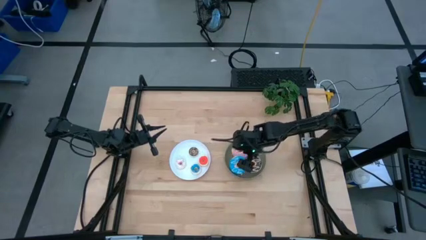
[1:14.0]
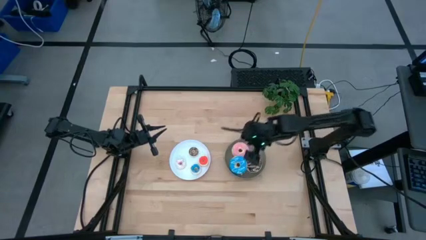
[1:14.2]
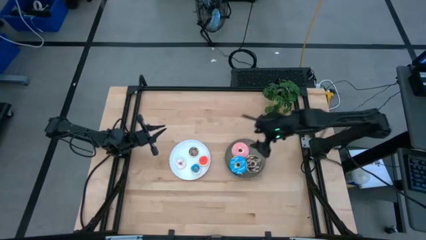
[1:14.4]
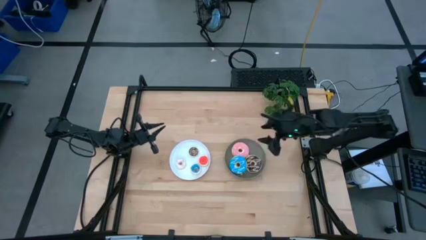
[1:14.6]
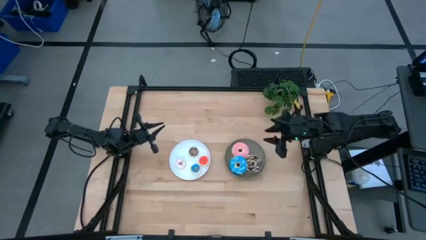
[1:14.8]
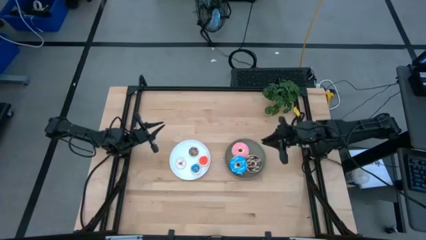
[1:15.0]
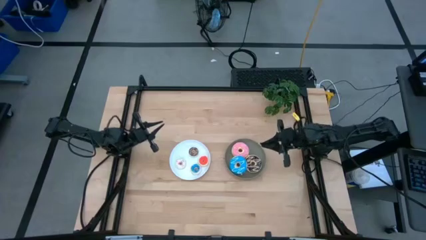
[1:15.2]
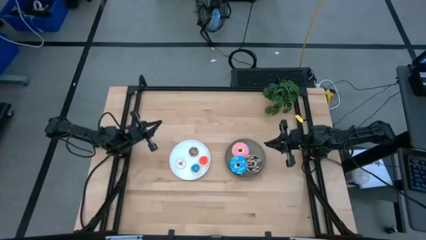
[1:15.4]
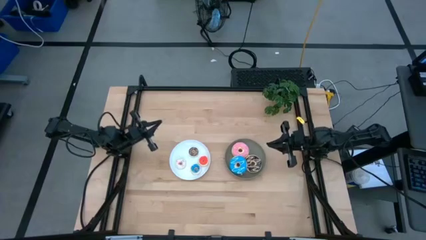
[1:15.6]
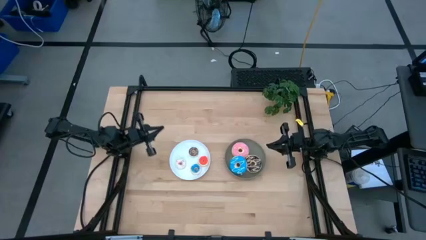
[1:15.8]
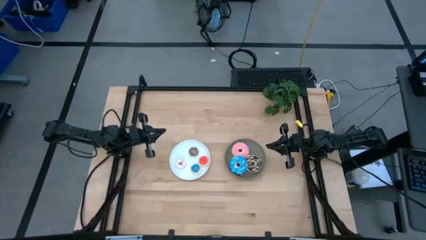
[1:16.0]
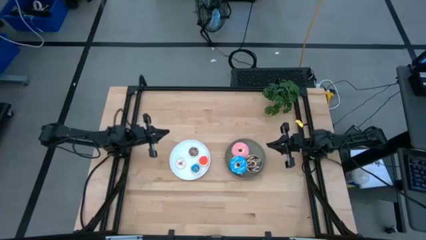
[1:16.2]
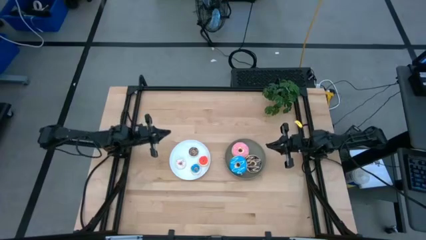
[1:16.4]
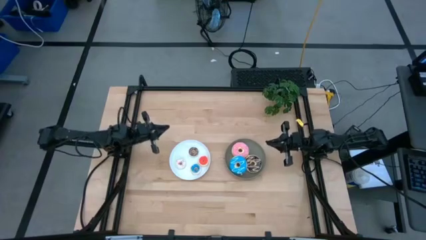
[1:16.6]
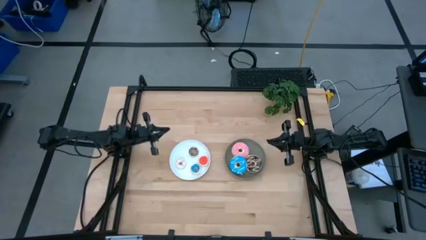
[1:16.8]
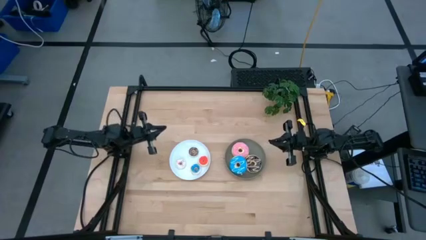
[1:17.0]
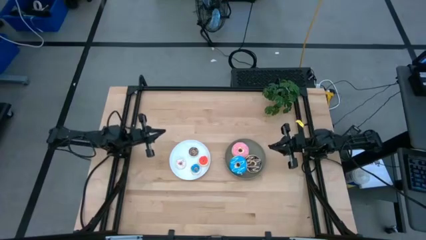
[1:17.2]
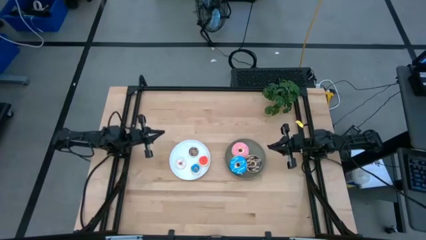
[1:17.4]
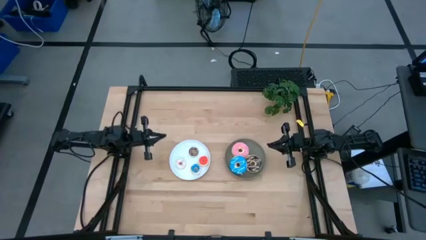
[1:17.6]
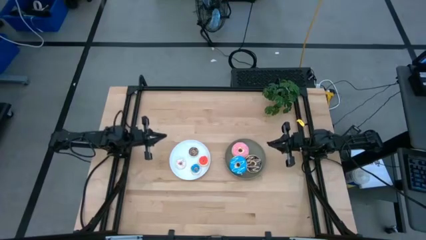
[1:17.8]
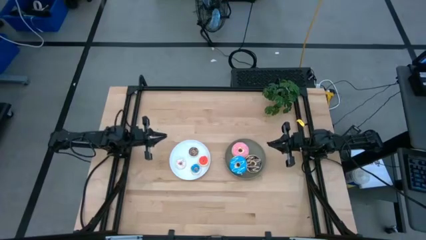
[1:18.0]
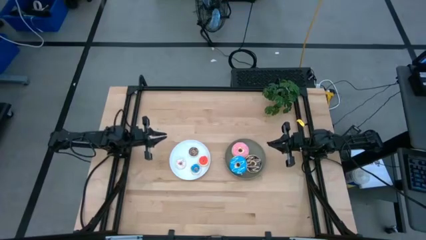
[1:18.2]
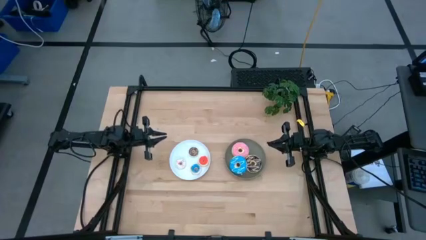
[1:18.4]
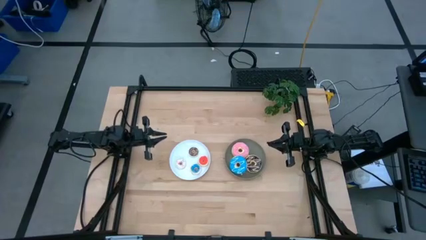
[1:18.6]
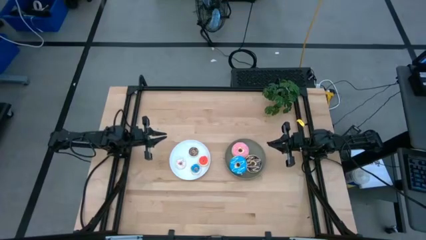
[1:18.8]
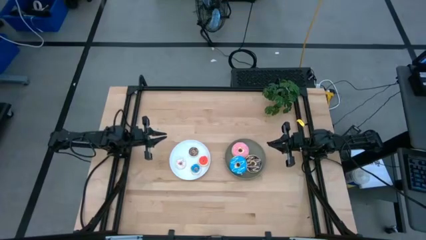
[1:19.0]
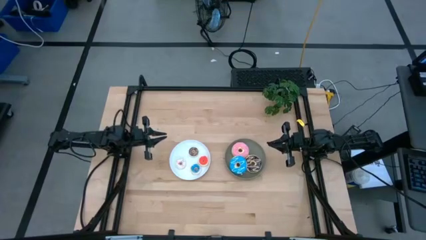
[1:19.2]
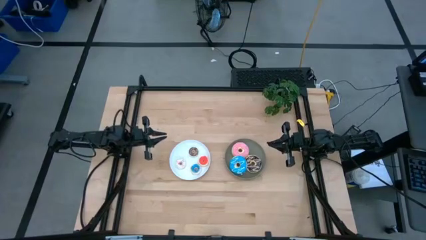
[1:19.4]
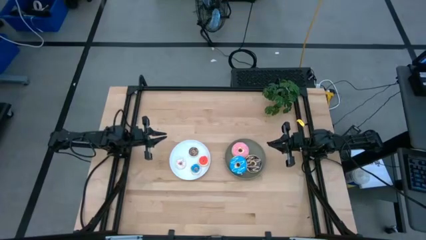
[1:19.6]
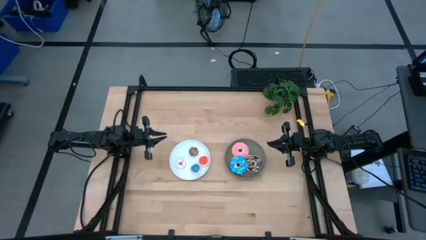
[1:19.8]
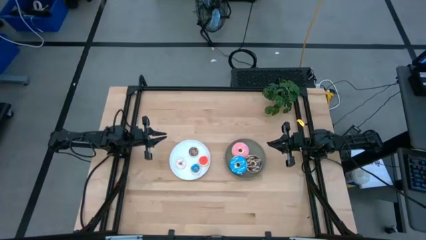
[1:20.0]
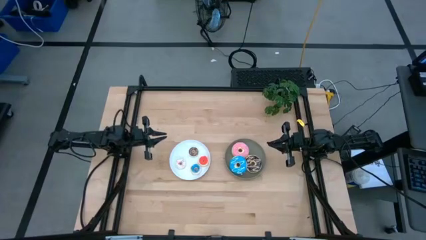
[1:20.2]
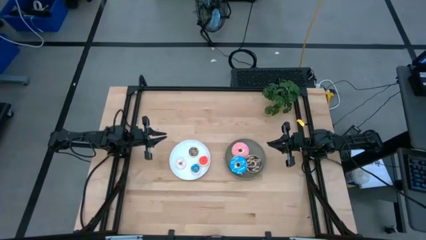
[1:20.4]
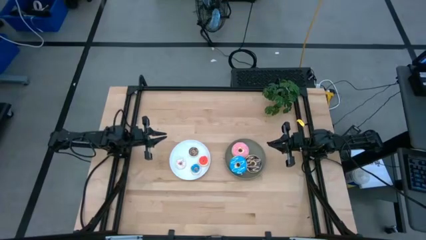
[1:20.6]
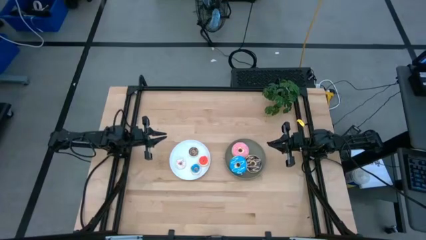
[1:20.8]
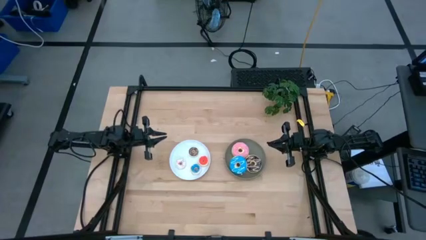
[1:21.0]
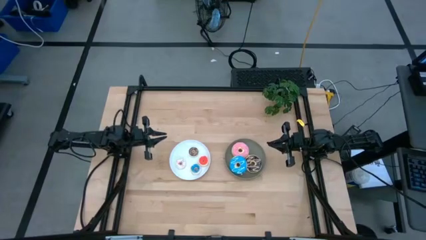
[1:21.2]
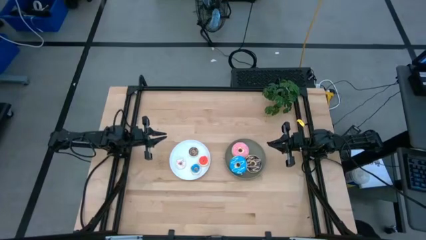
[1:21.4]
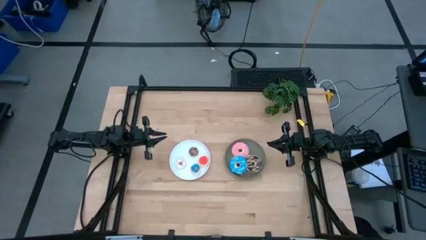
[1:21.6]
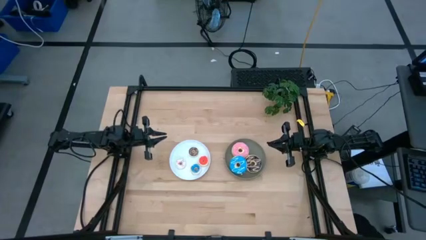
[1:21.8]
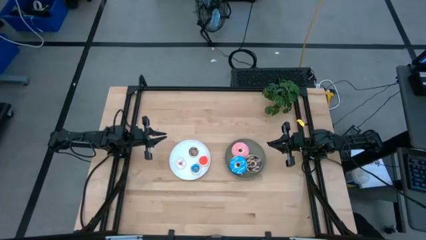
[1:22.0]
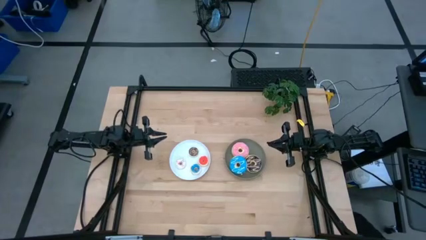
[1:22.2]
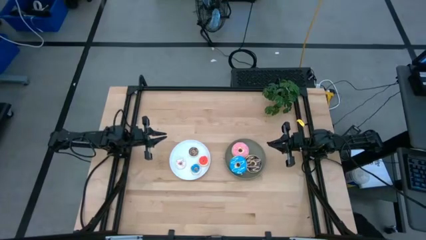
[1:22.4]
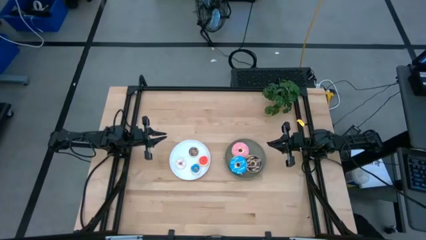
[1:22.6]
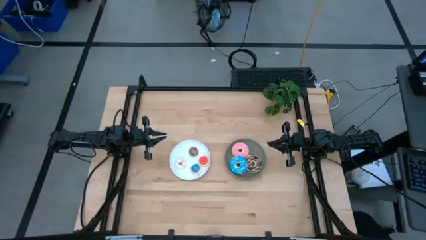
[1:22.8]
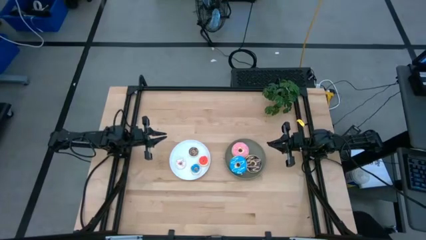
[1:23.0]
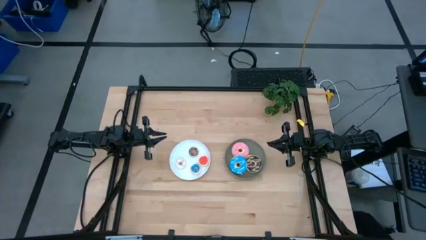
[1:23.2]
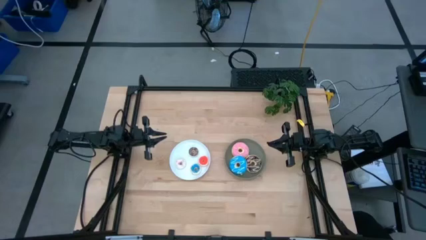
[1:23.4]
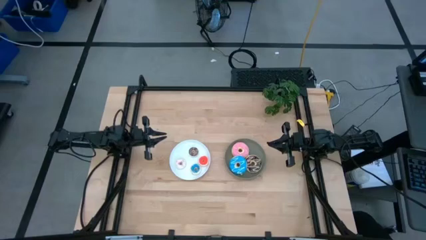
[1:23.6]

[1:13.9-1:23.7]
Task: Pick & Place donuts
Return to Home Position
